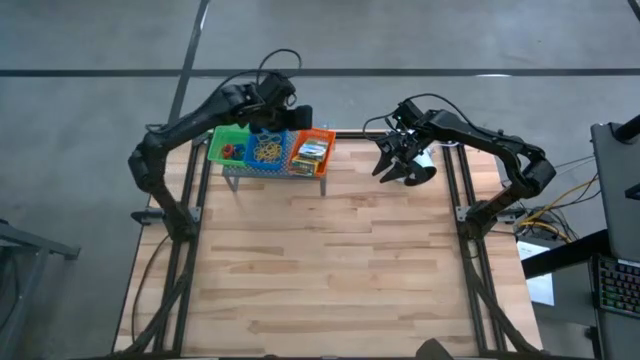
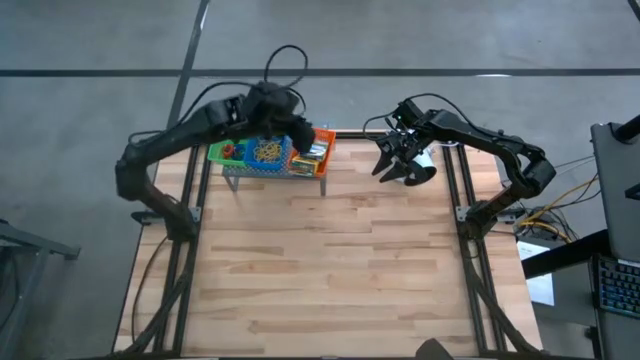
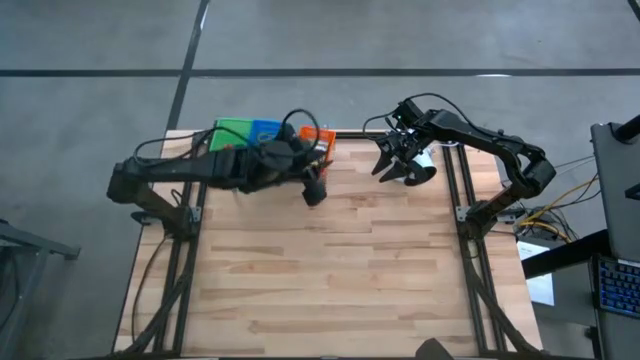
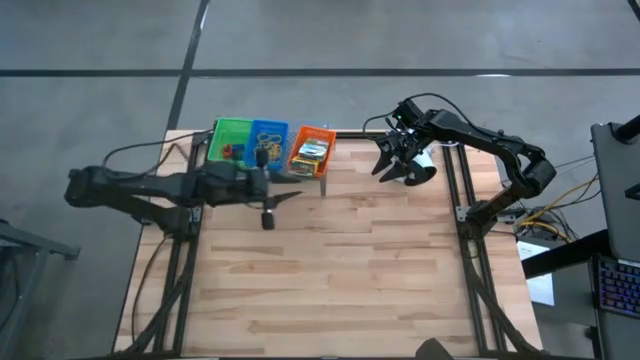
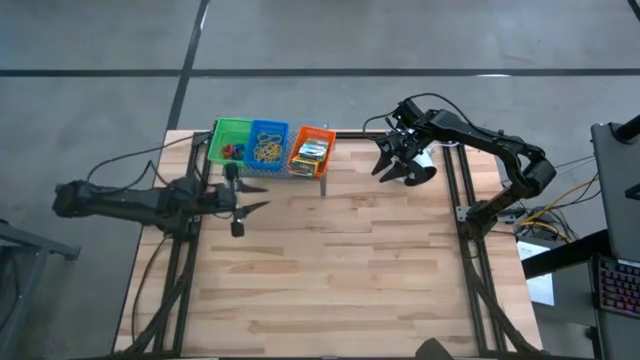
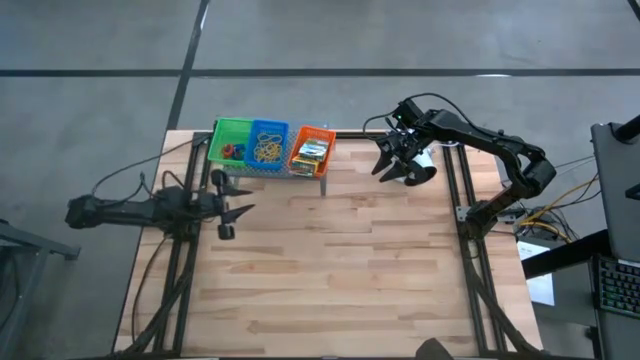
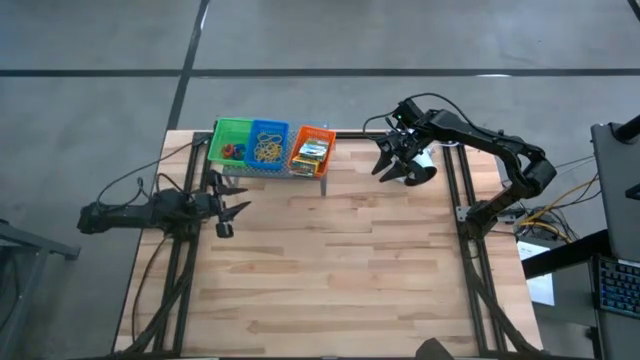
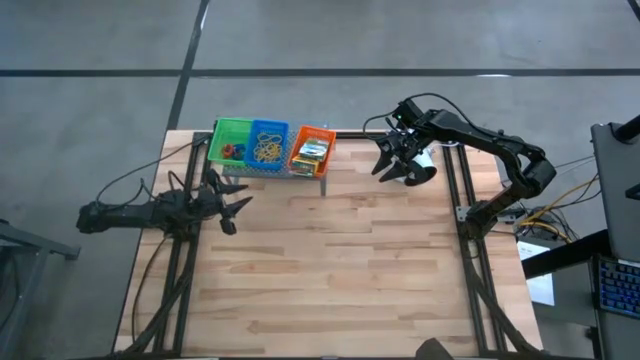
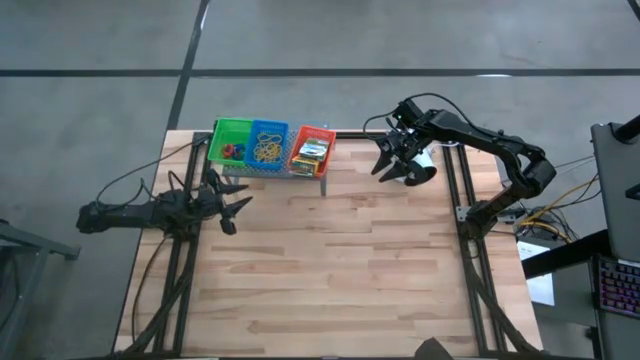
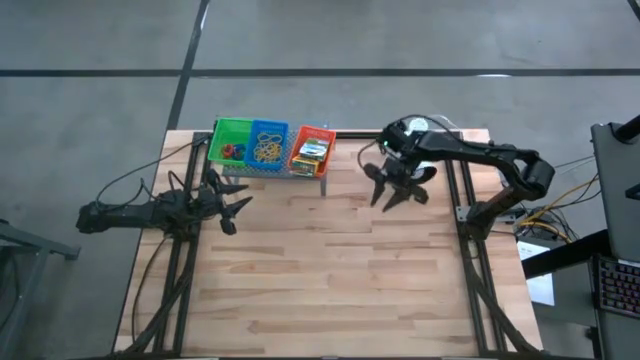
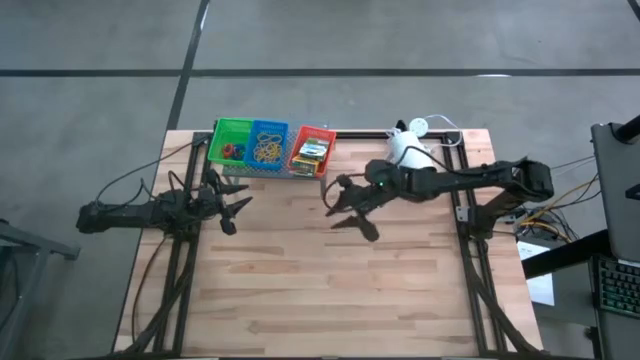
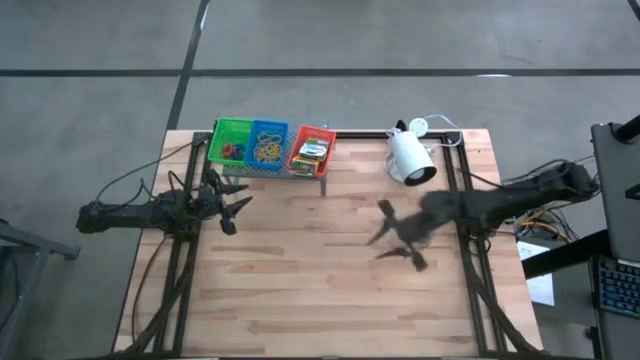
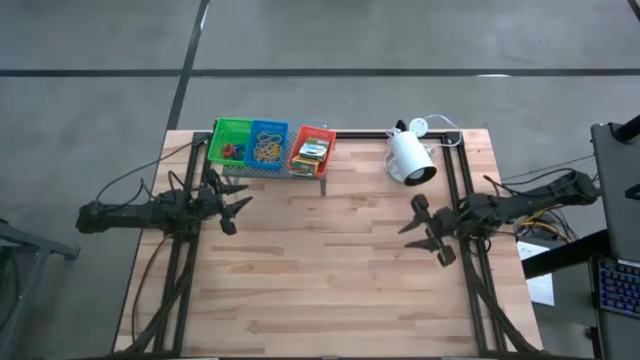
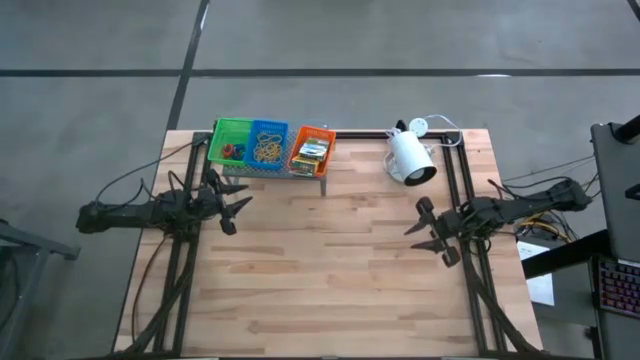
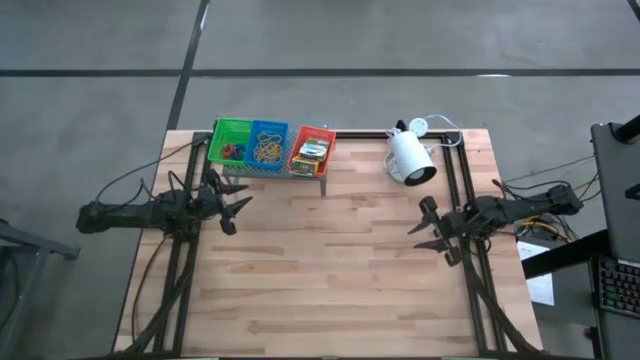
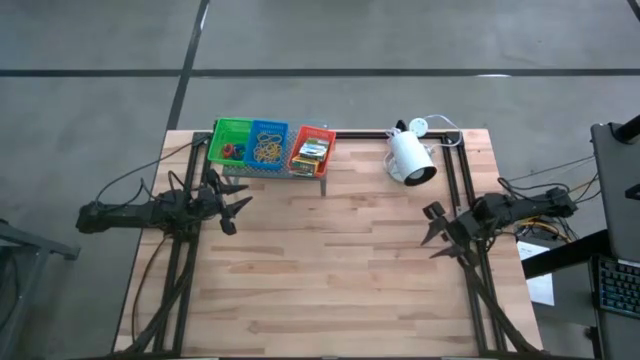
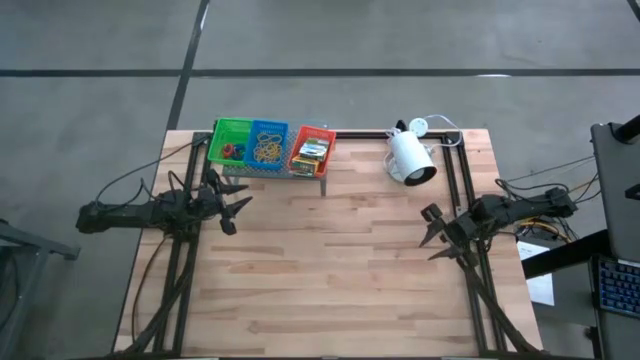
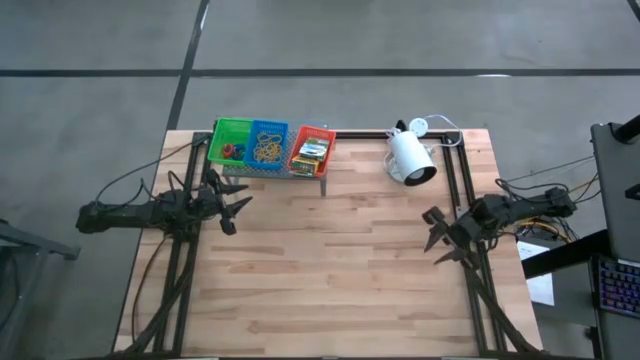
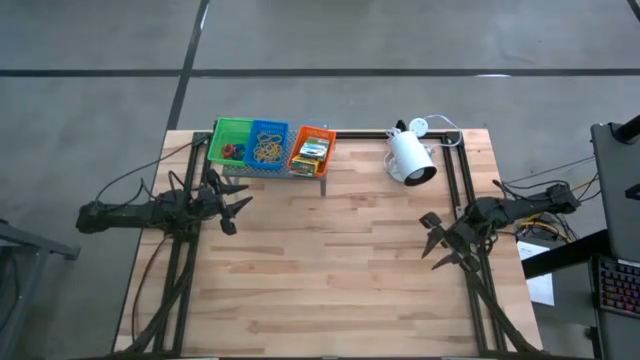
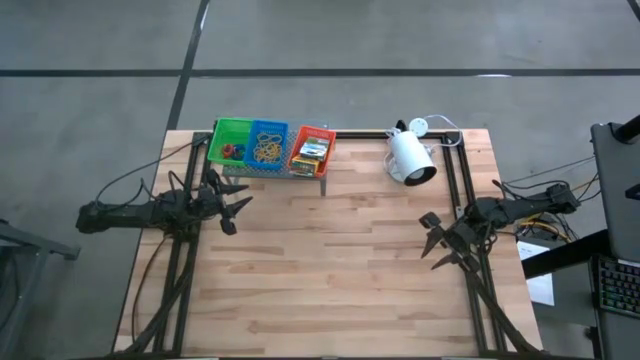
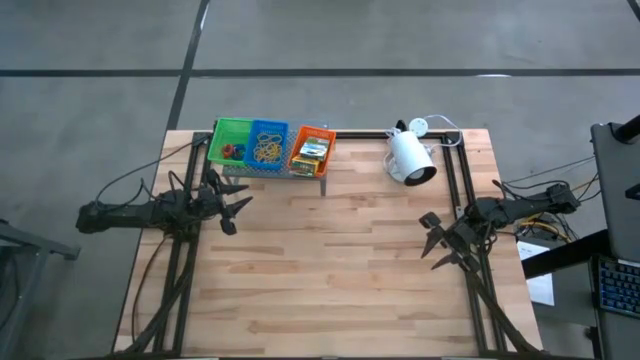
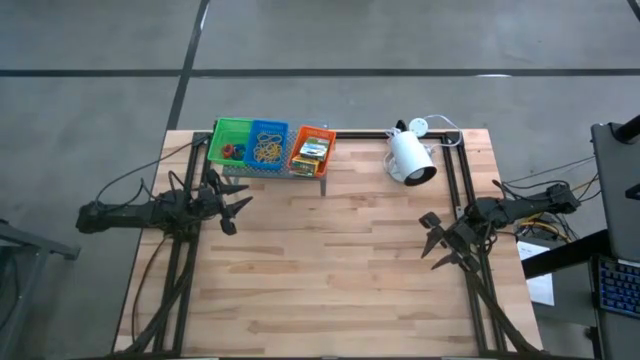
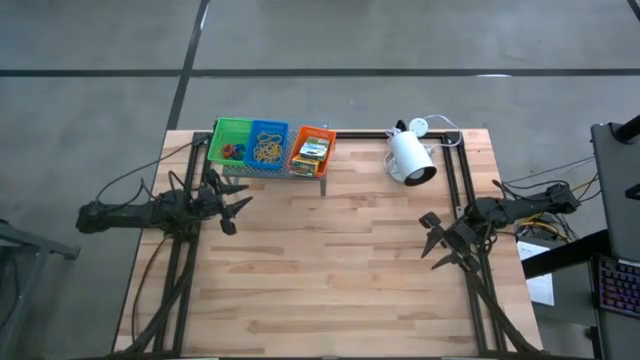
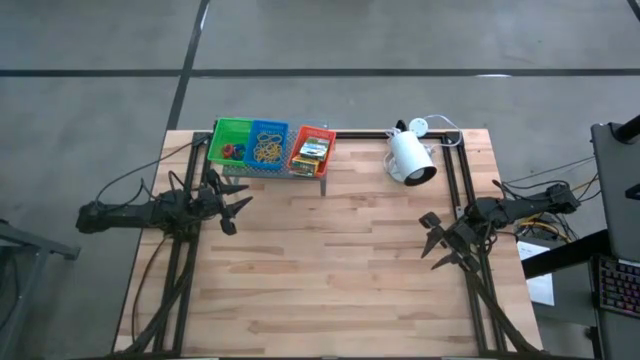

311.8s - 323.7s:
Task: Pick & Place Office Desk Supplies
Return to Home Position

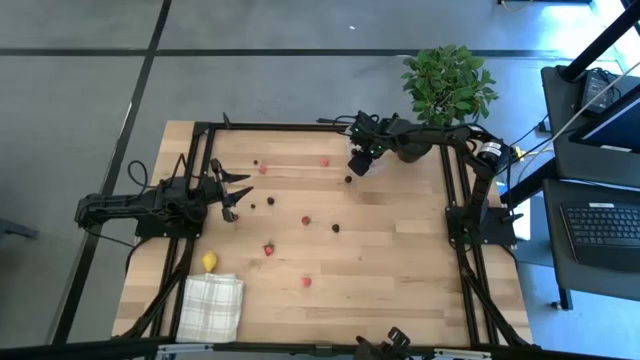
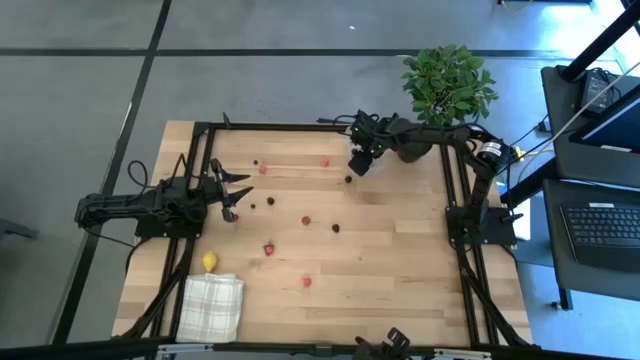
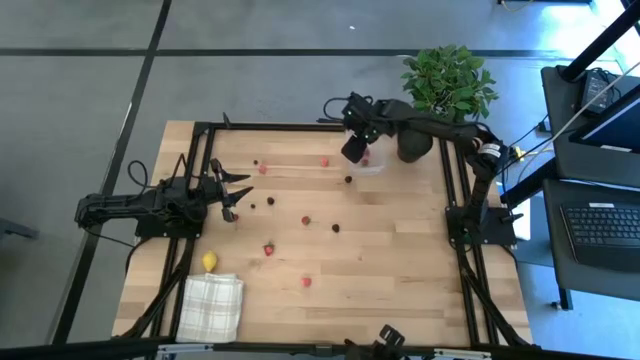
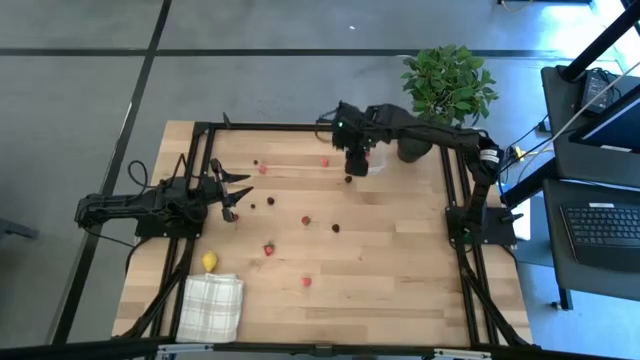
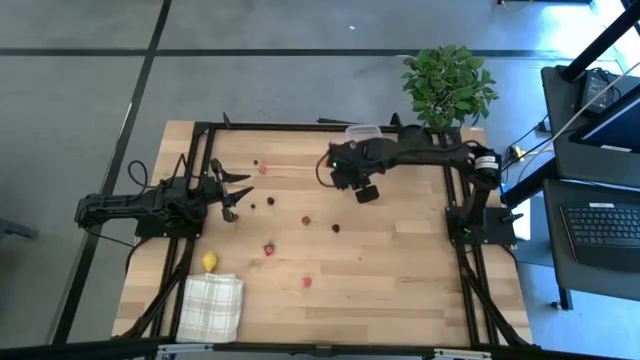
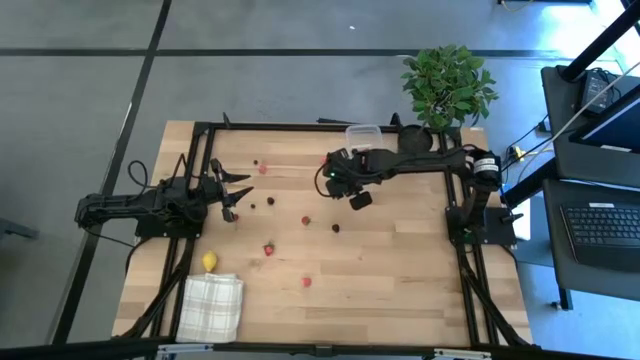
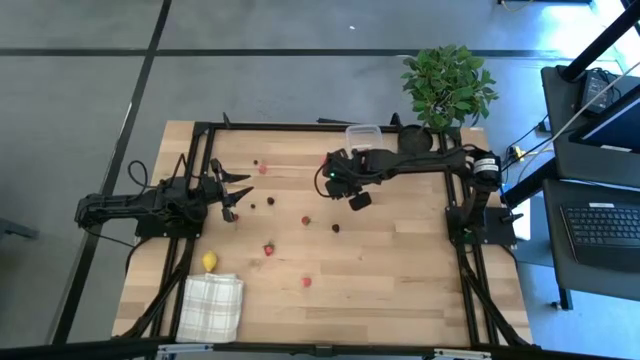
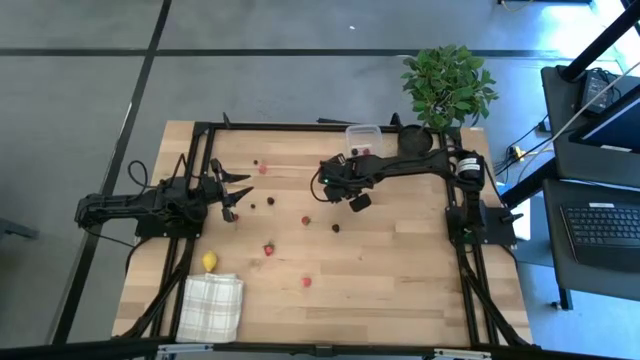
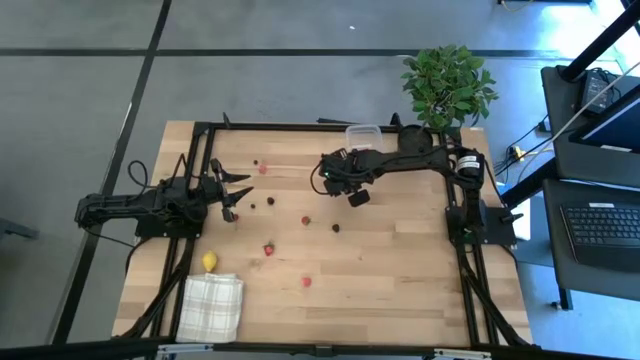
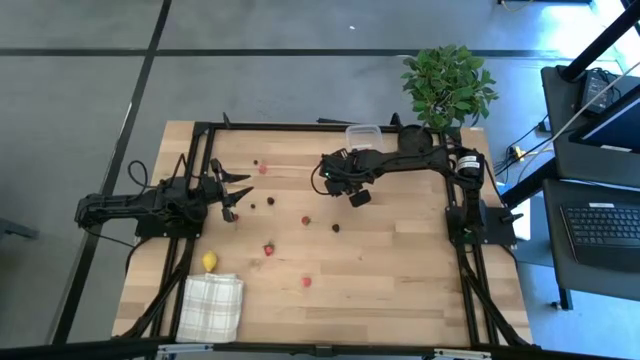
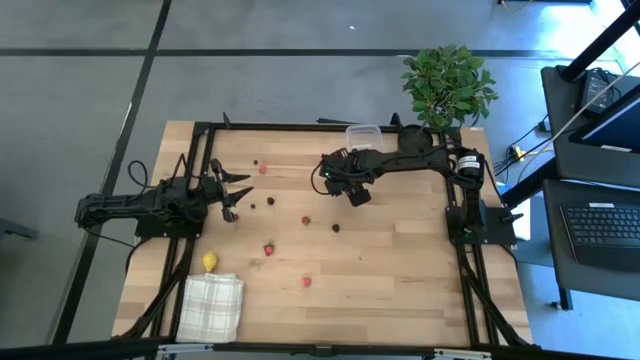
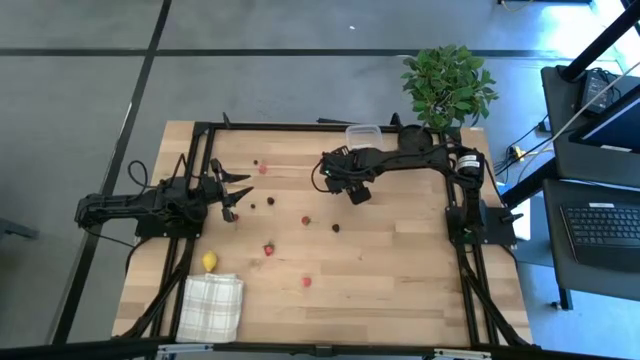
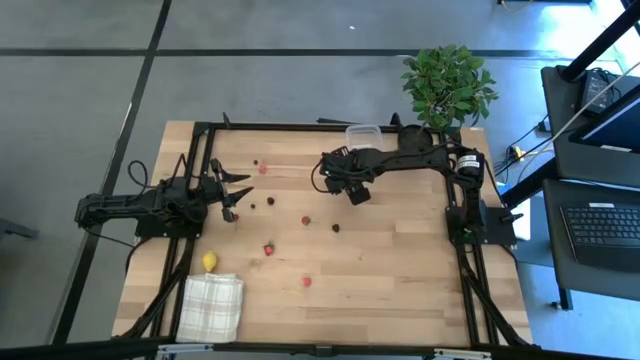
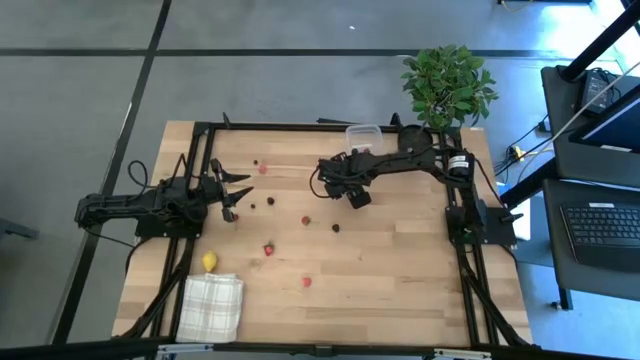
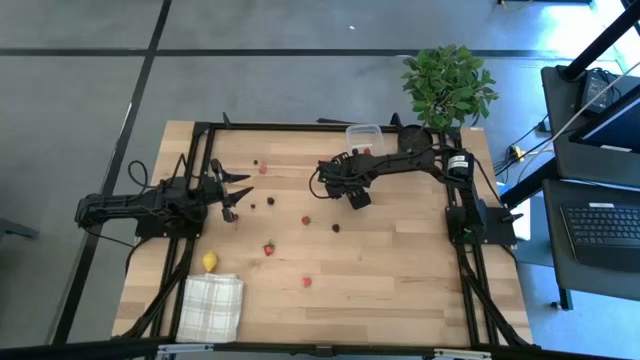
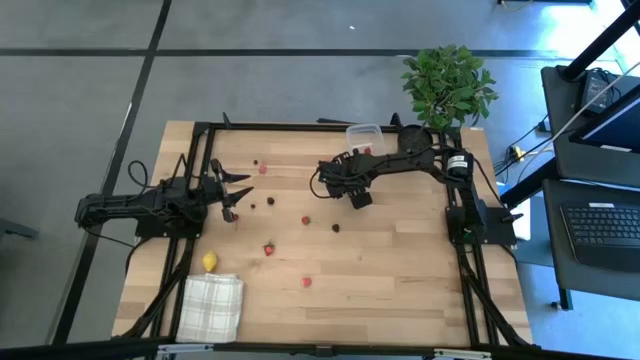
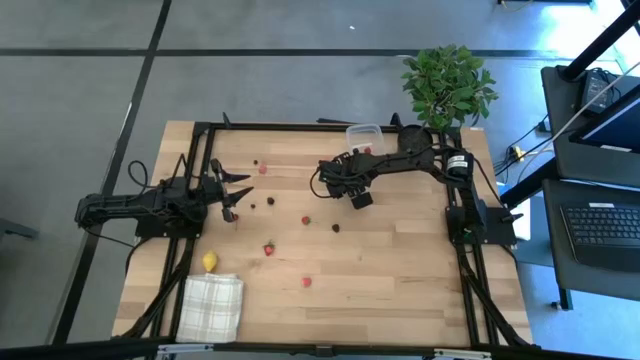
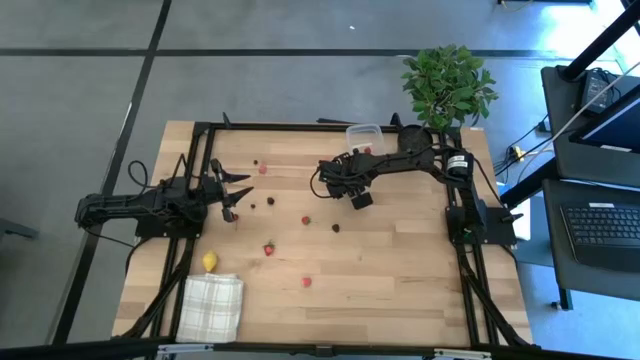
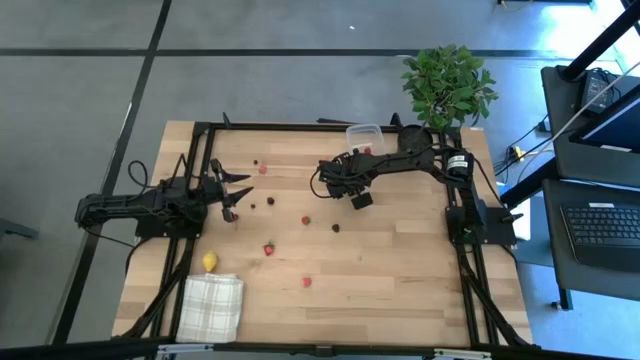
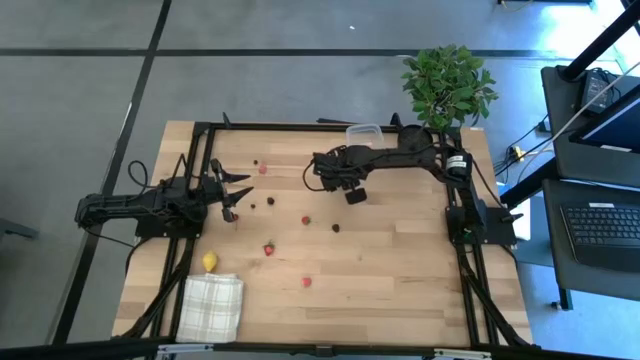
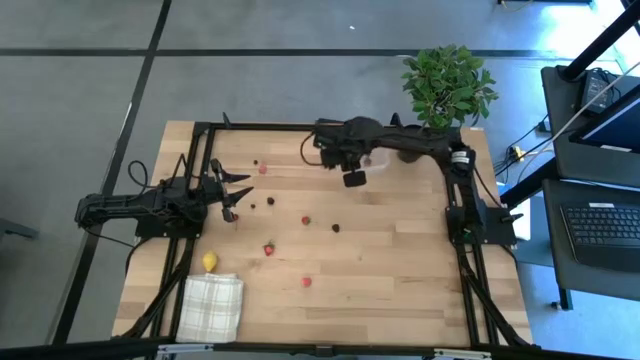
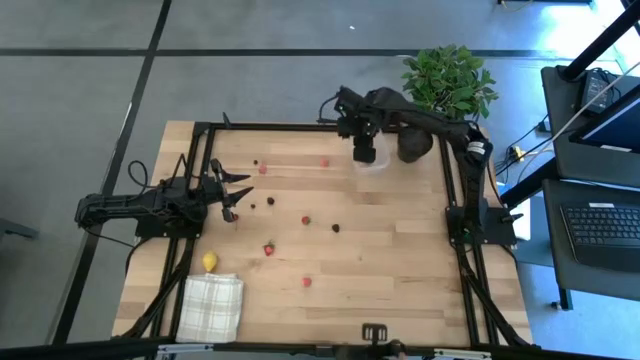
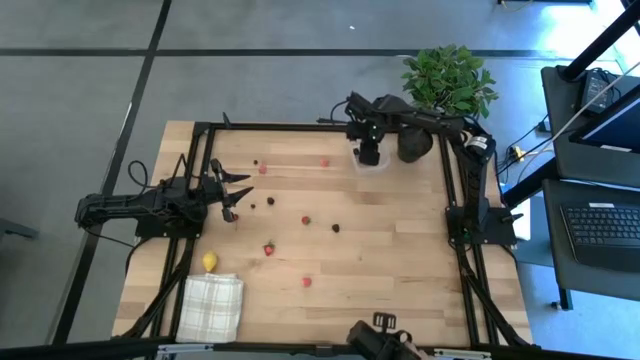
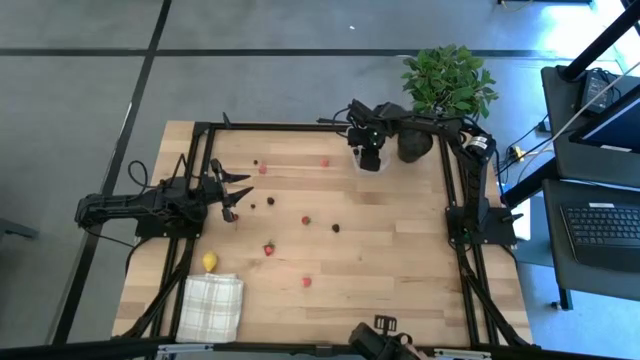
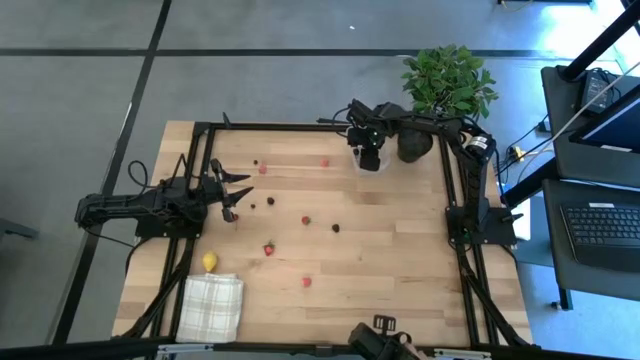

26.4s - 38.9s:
Task: Pick and placing Produce into tupperware
Put the black cherry into the transparent bin
